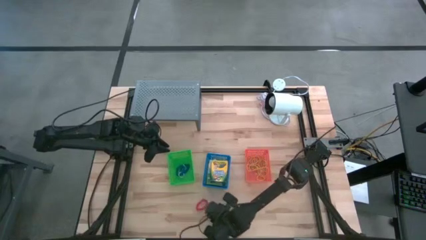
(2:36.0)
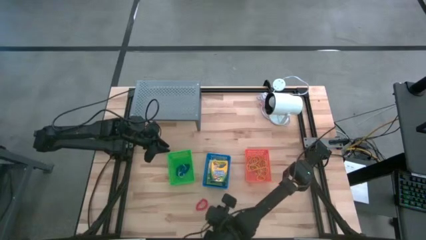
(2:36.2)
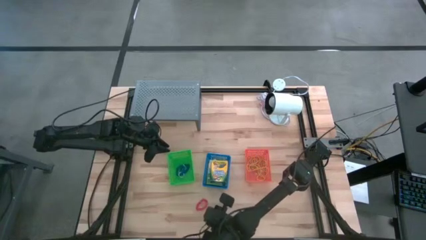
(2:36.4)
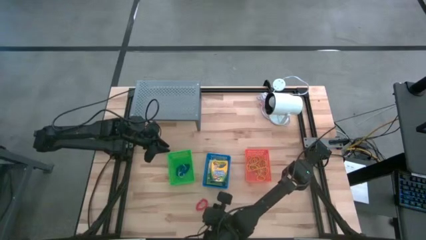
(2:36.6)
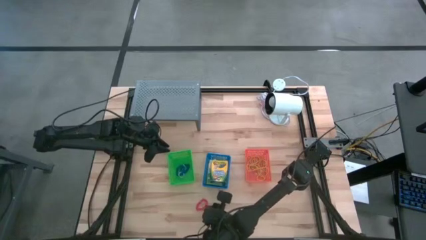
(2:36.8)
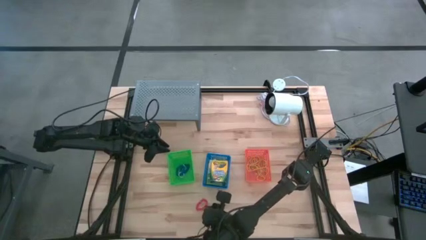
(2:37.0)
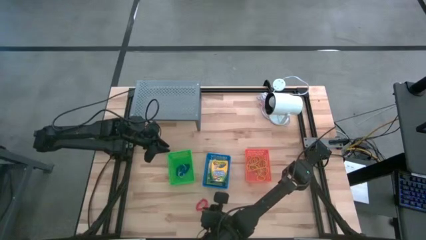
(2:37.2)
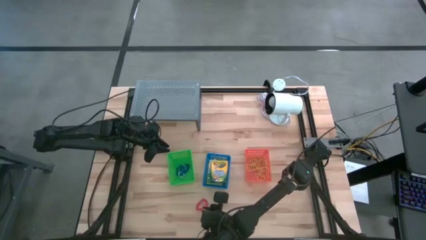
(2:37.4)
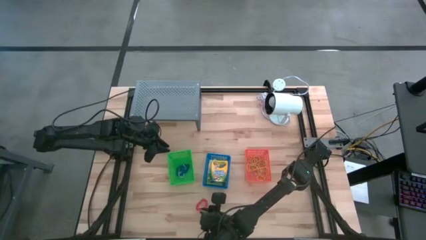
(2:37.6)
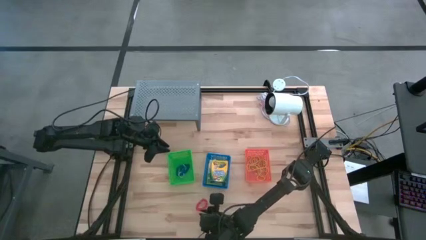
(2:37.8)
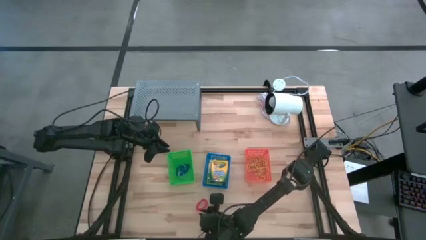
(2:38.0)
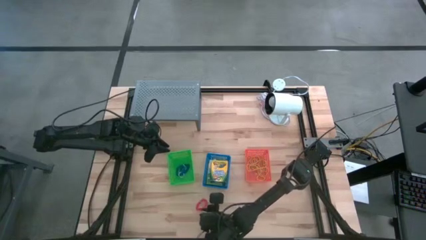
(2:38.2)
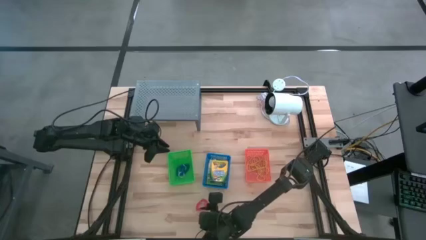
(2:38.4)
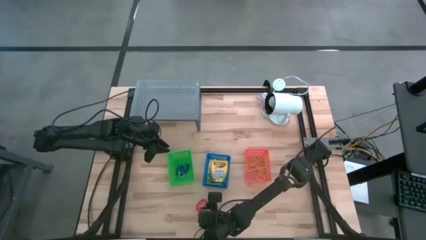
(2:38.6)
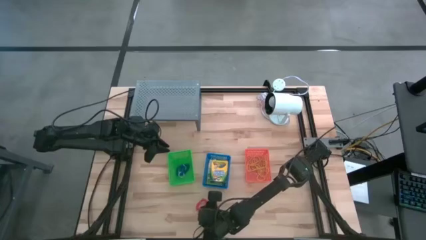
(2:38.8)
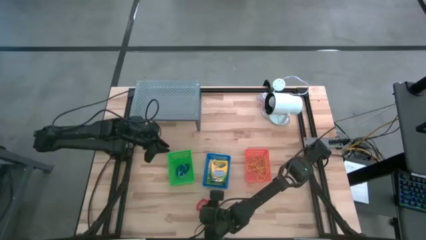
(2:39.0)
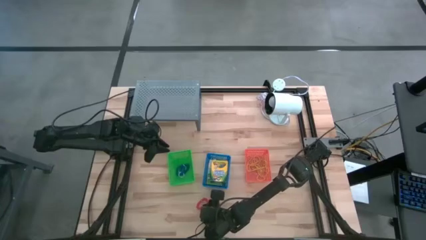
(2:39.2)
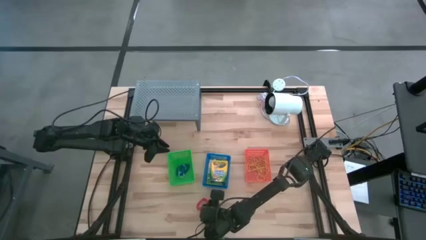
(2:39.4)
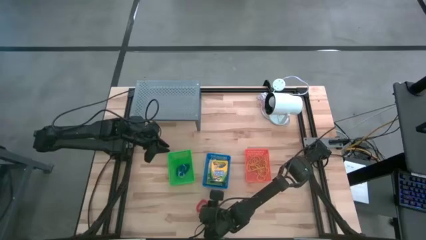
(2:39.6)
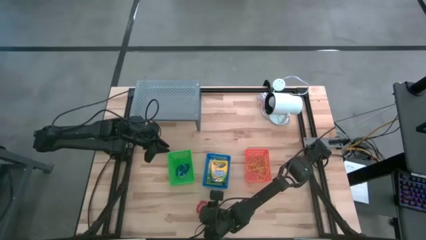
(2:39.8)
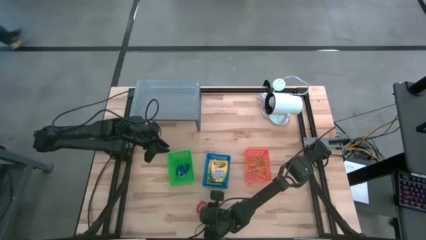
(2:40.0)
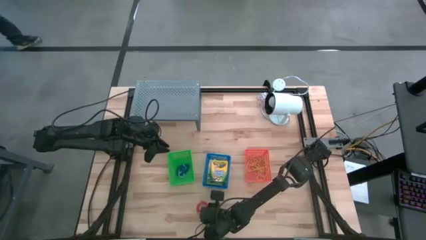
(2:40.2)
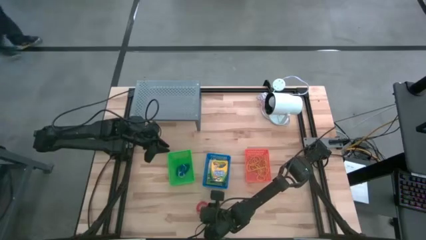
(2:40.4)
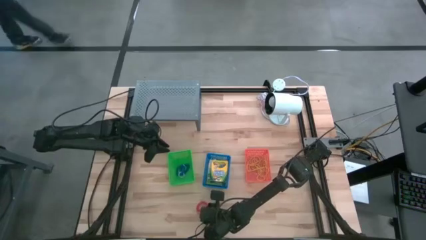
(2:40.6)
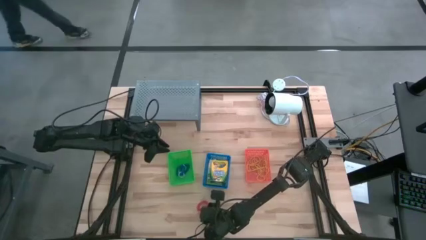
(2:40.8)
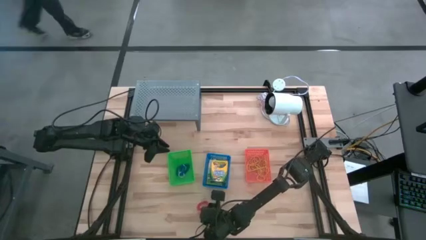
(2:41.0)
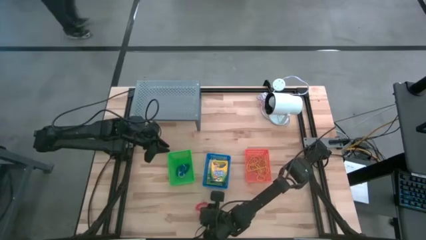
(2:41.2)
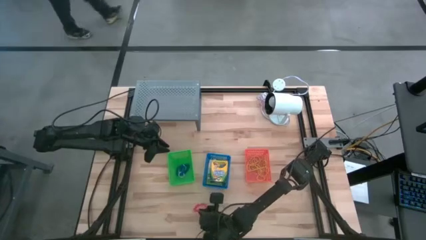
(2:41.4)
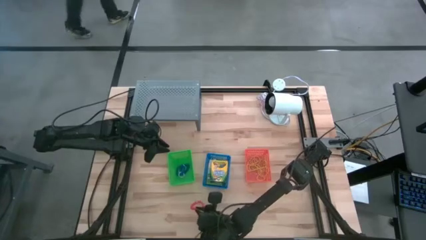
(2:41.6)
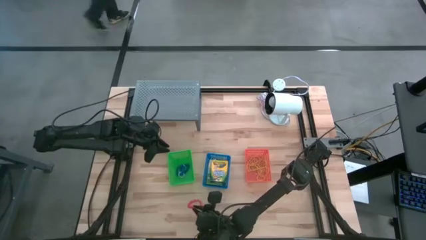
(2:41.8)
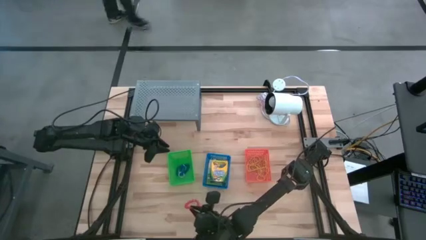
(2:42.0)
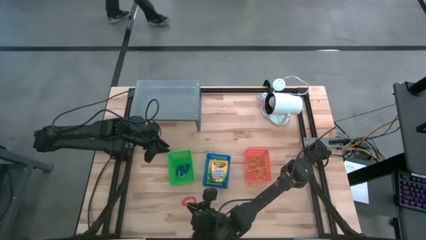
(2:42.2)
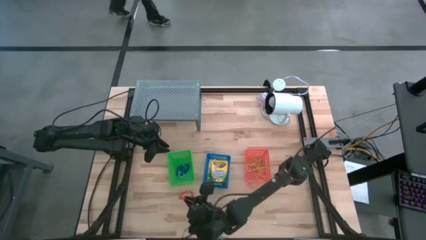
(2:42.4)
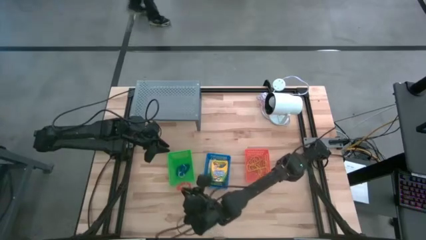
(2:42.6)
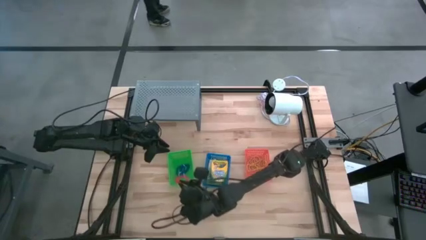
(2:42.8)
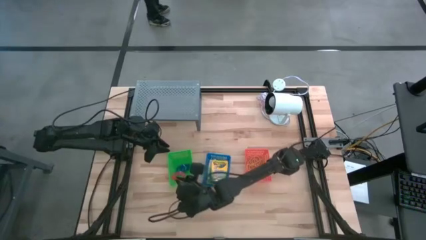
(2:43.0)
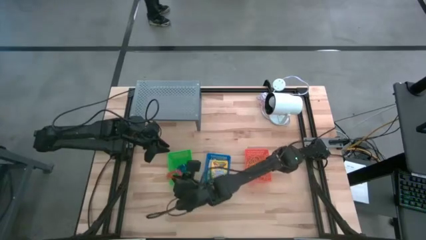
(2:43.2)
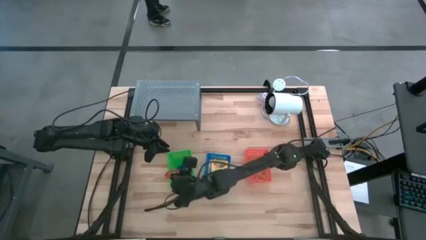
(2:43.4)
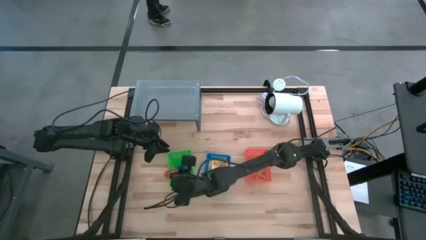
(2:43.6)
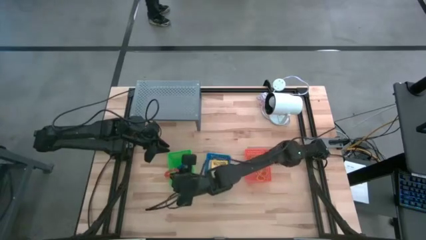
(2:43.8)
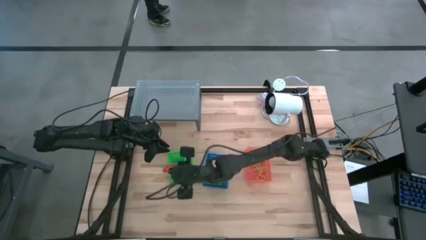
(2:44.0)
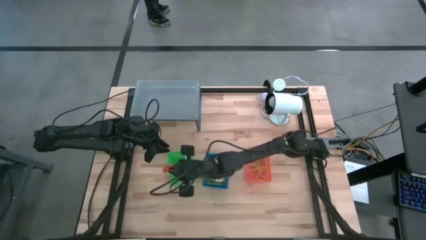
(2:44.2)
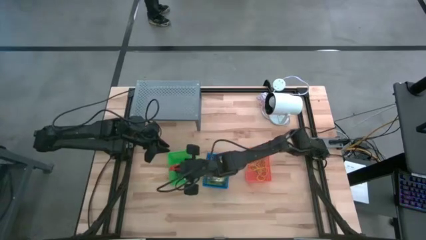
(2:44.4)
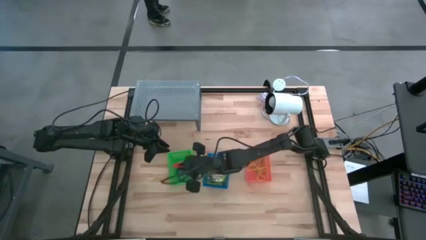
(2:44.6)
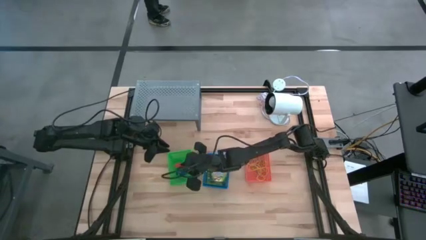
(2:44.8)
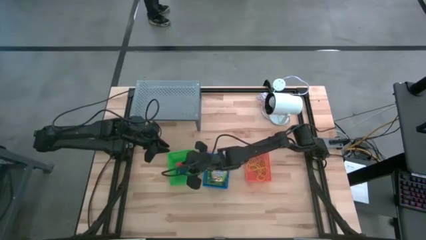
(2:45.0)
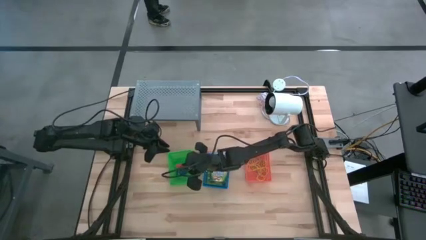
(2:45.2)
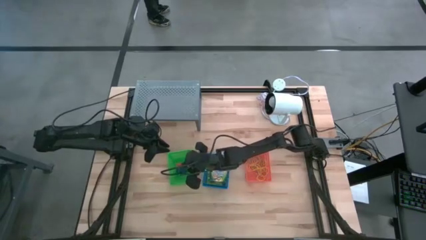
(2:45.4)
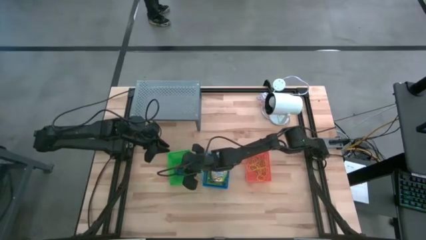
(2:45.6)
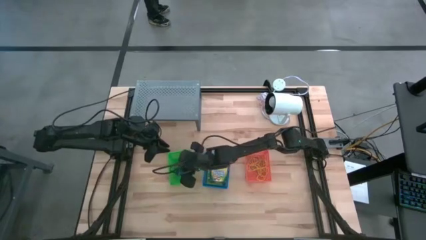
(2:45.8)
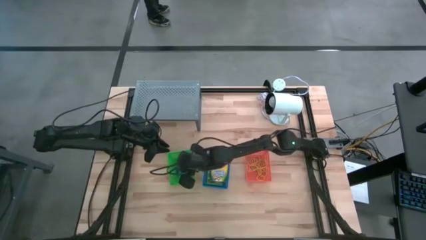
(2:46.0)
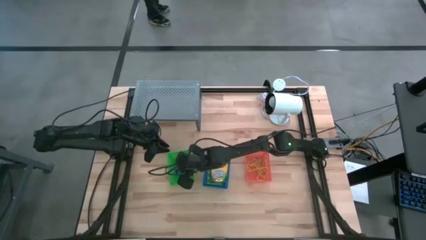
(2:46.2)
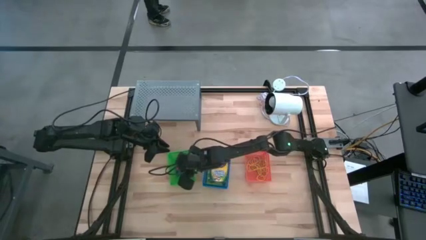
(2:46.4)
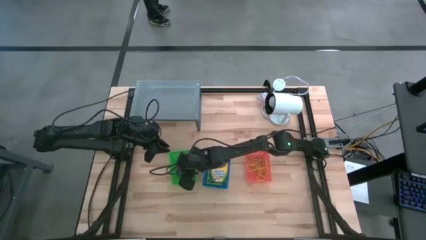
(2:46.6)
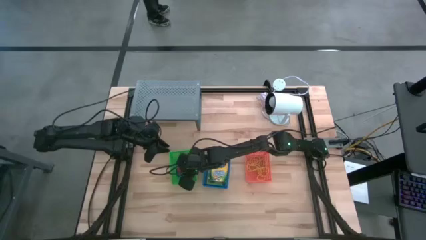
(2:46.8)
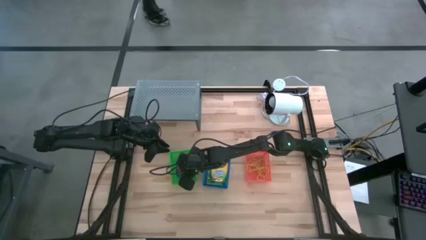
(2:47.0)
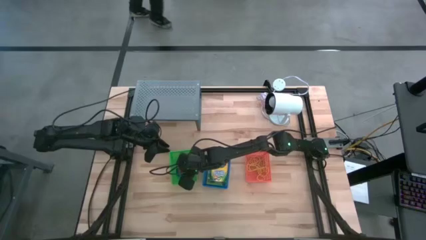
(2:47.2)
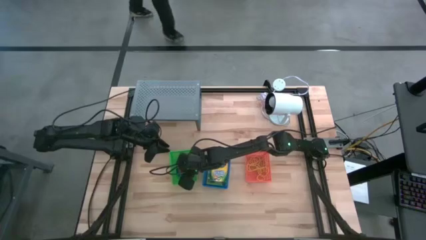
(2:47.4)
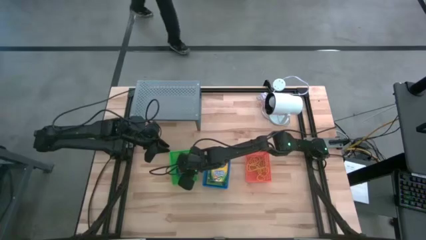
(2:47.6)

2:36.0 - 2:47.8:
Task: Pick & Place Office Desk Supplies
Put the orange spring keychain into the green bin

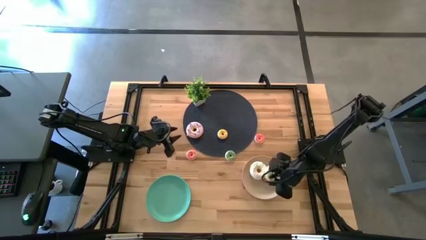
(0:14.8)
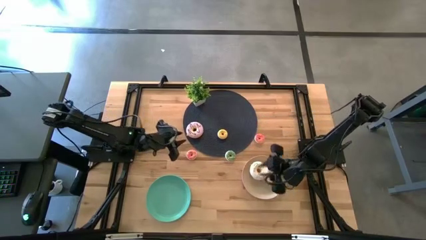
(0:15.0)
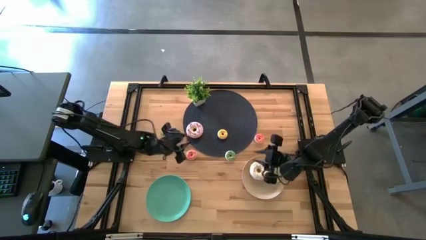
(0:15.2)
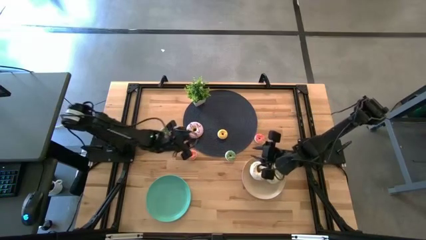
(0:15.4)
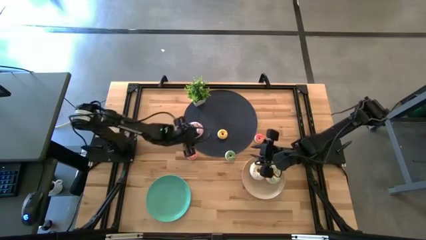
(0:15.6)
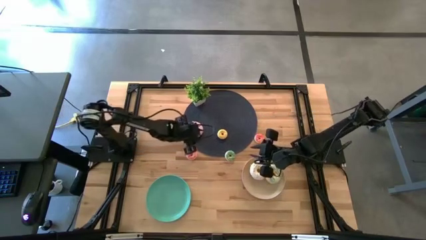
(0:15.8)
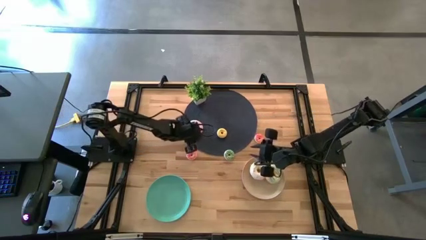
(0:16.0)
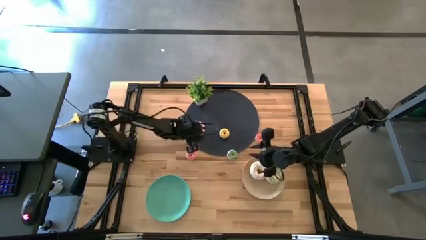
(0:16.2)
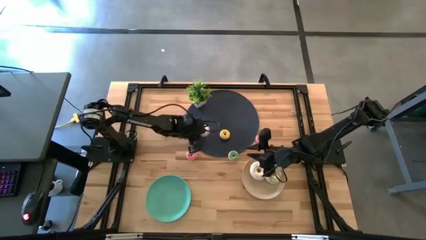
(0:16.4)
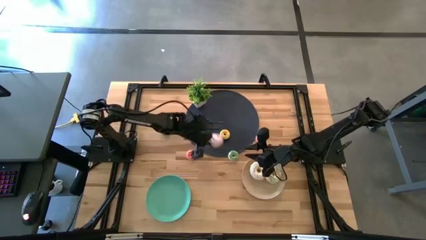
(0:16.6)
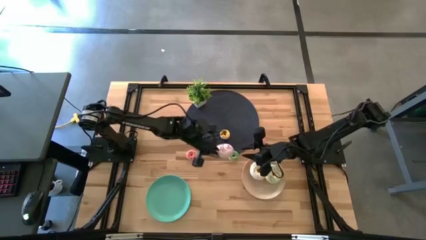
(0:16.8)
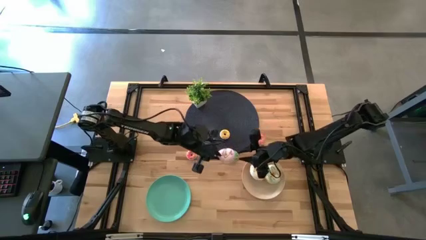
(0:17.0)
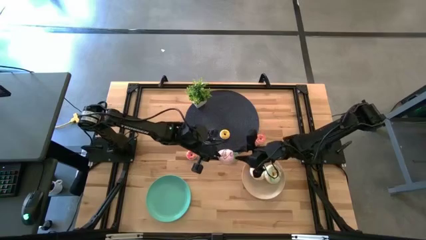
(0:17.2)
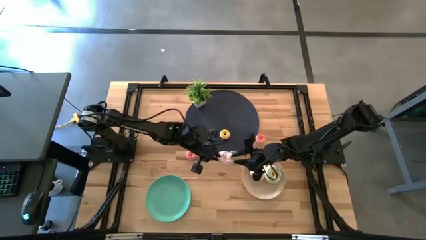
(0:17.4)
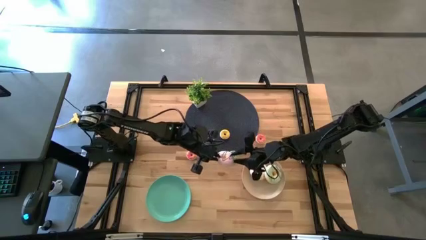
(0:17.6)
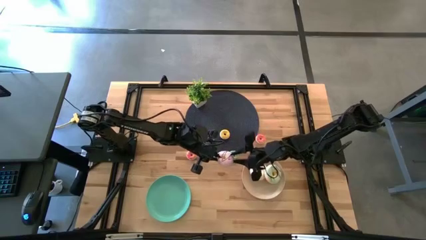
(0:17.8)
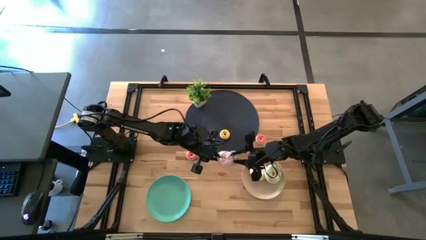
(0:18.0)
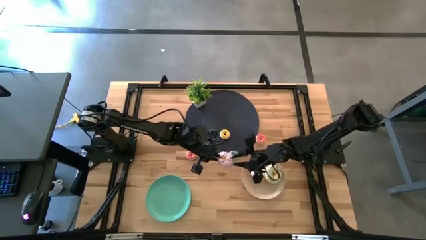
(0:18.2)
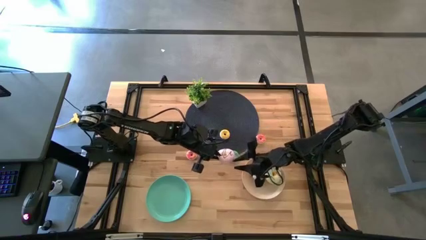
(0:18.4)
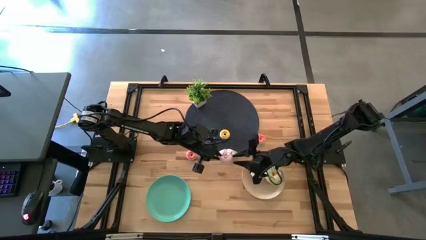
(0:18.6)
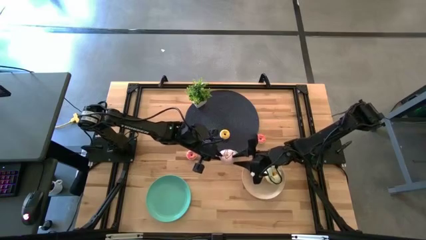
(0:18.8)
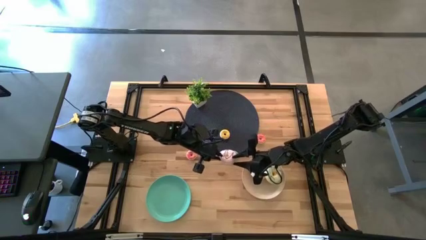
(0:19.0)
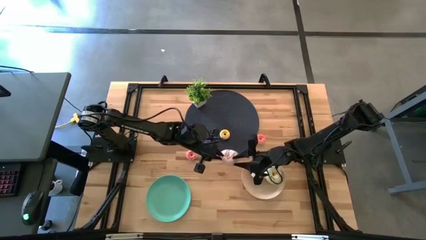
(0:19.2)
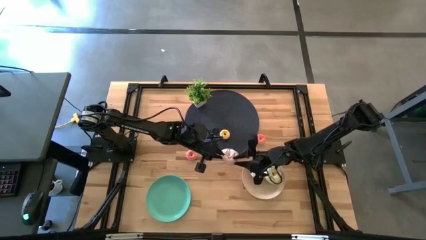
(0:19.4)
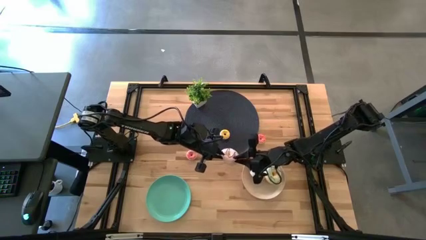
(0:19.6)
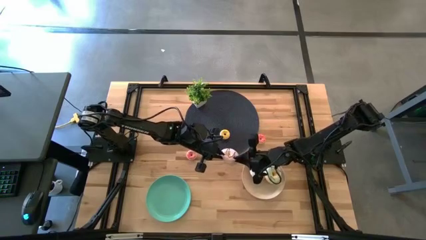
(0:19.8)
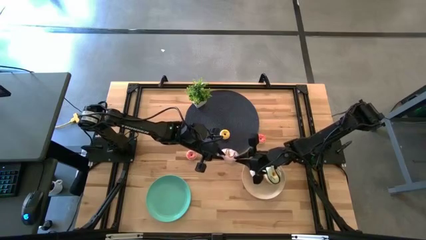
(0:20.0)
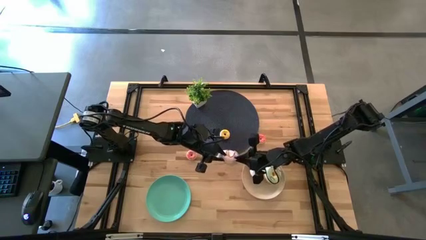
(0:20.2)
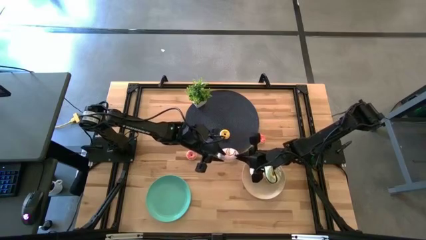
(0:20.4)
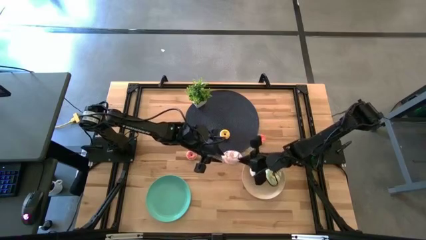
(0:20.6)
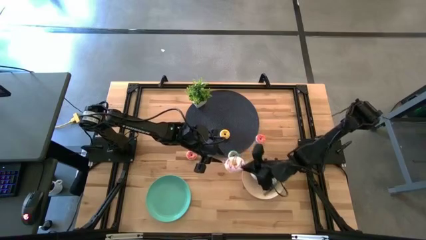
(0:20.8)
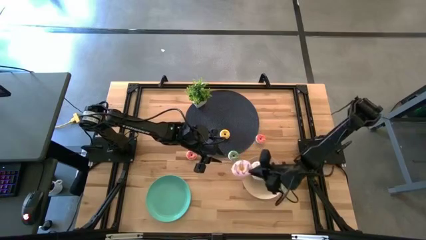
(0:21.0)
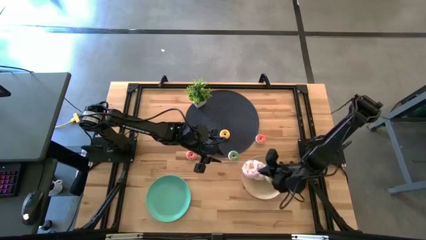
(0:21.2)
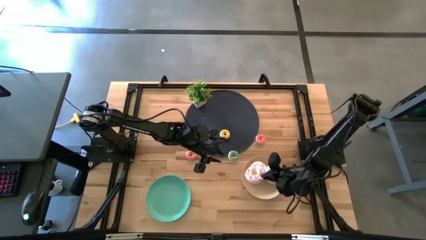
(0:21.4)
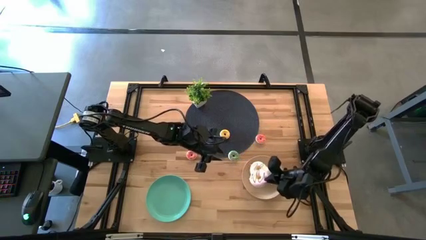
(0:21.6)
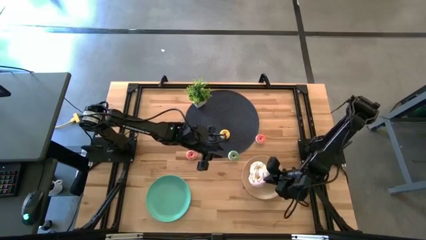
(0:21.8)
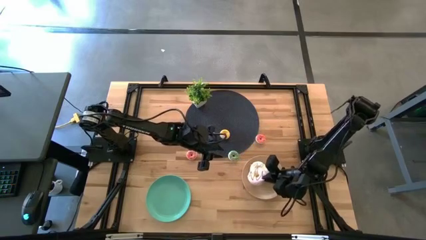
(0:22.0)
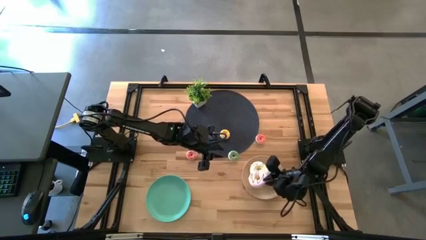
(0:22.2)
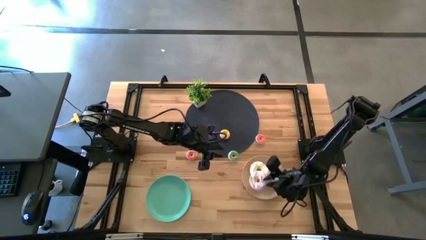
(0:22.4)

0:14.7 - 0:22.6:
Task: Pick & Place donuts
Put the large purple donut on the brown plate
